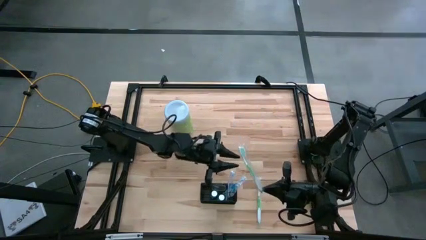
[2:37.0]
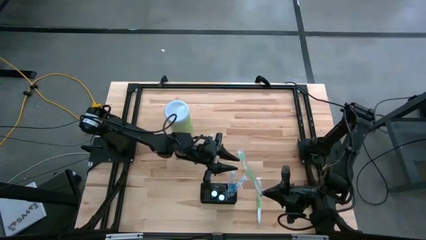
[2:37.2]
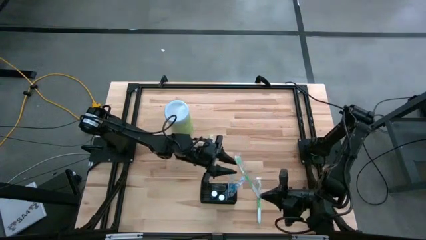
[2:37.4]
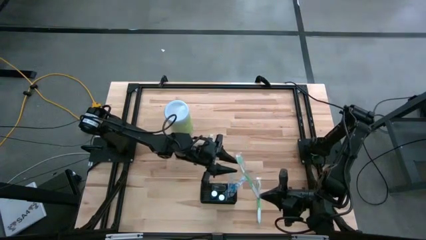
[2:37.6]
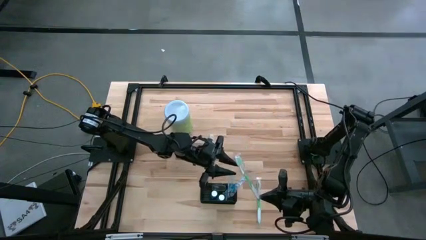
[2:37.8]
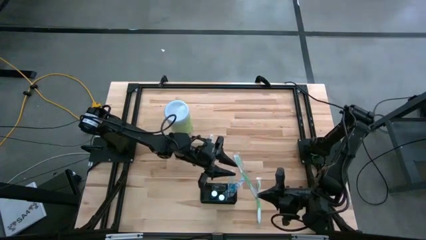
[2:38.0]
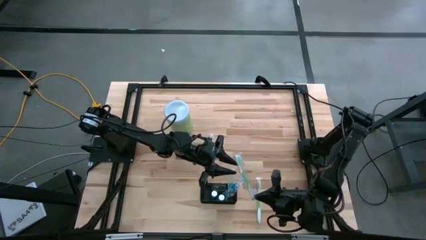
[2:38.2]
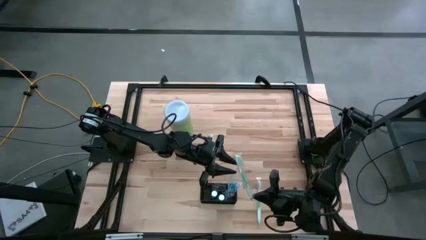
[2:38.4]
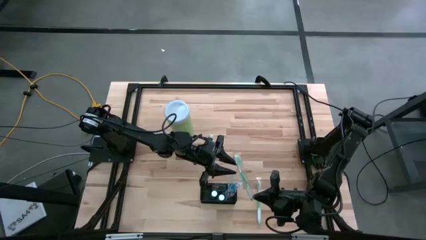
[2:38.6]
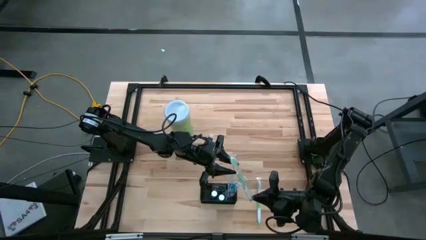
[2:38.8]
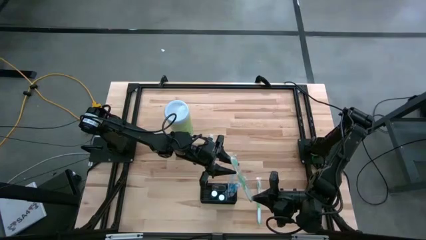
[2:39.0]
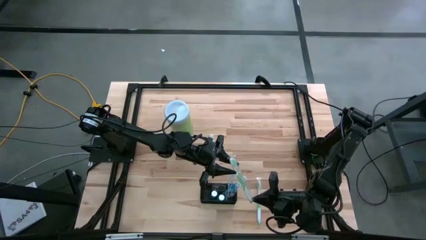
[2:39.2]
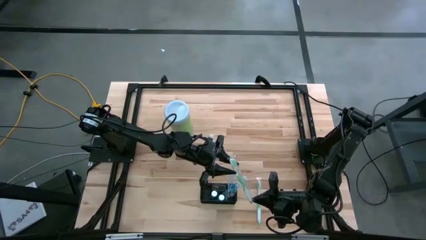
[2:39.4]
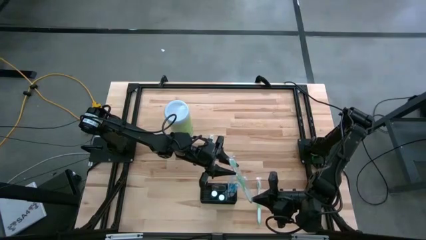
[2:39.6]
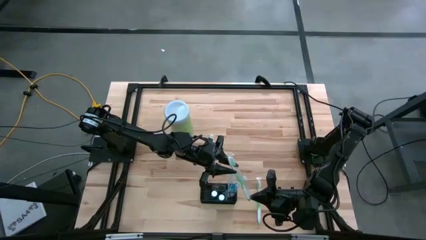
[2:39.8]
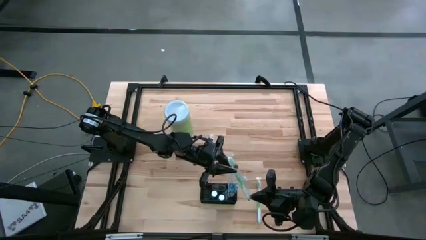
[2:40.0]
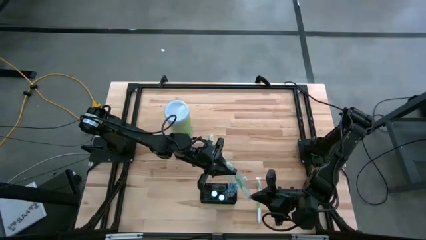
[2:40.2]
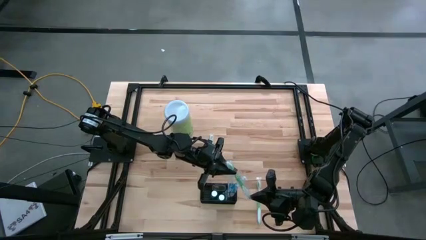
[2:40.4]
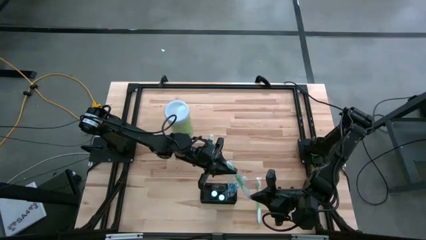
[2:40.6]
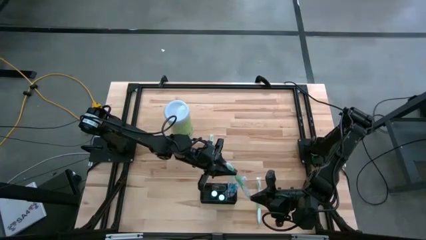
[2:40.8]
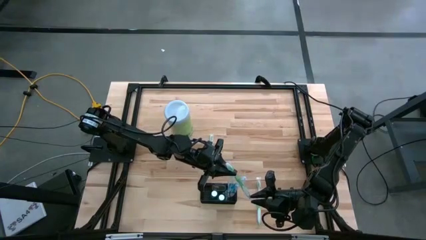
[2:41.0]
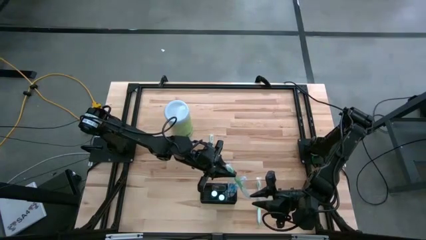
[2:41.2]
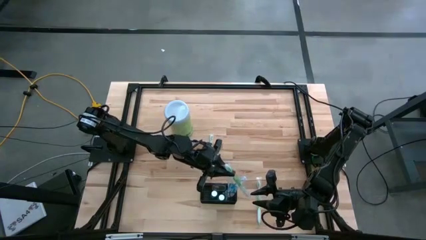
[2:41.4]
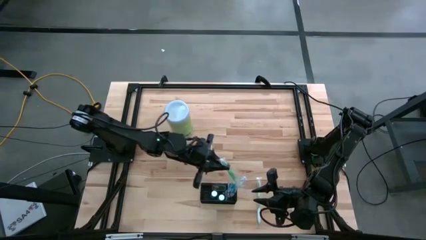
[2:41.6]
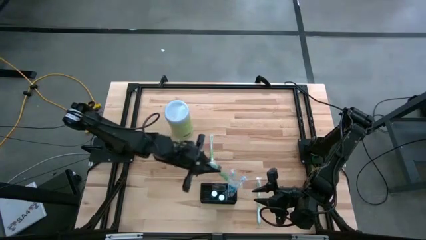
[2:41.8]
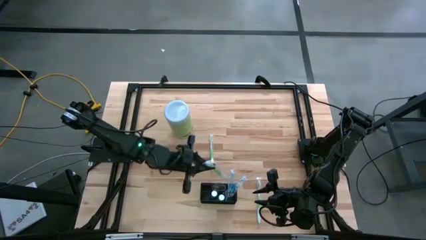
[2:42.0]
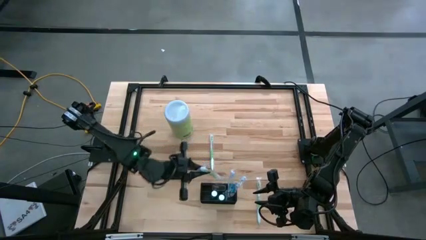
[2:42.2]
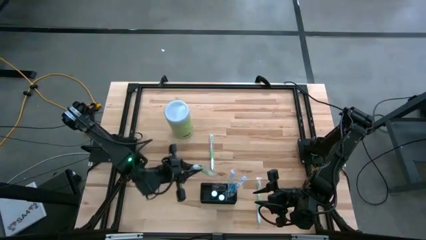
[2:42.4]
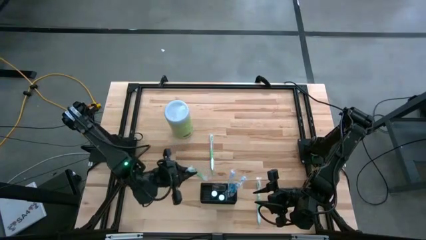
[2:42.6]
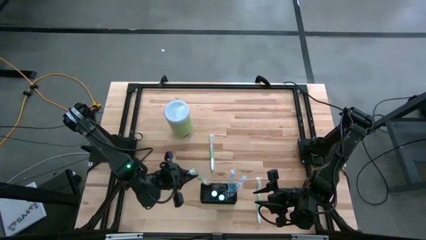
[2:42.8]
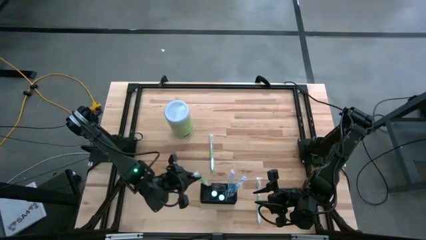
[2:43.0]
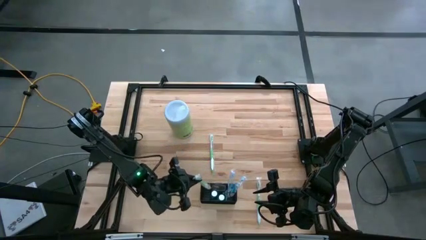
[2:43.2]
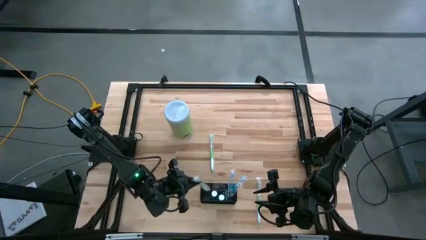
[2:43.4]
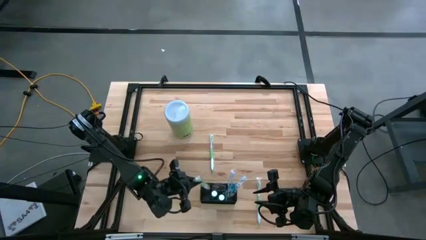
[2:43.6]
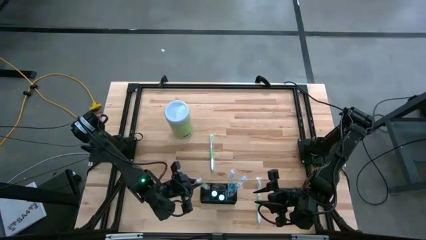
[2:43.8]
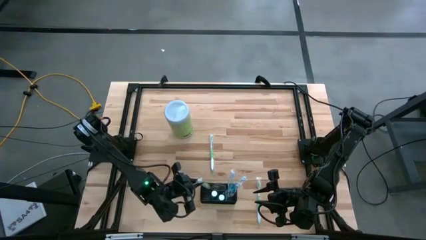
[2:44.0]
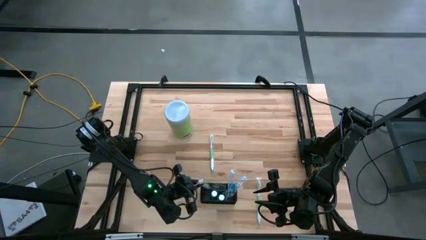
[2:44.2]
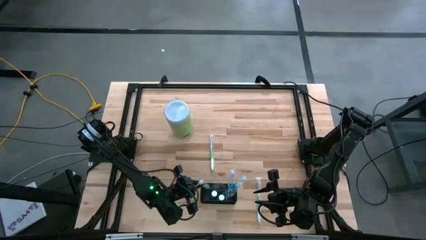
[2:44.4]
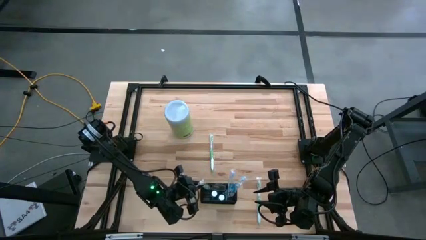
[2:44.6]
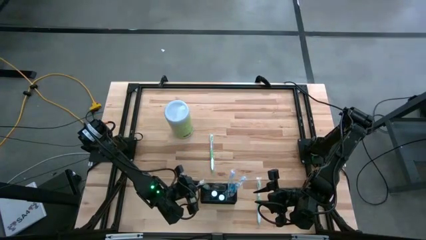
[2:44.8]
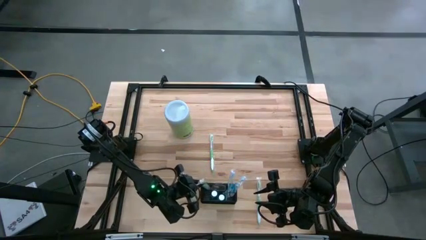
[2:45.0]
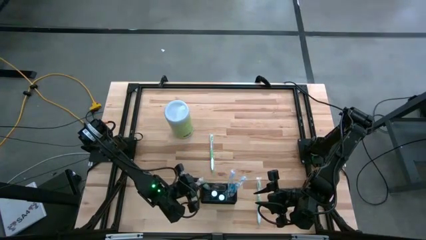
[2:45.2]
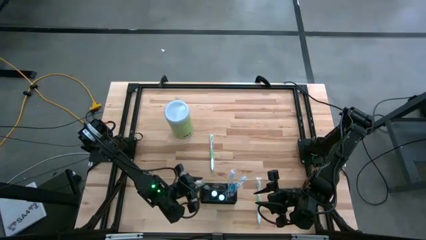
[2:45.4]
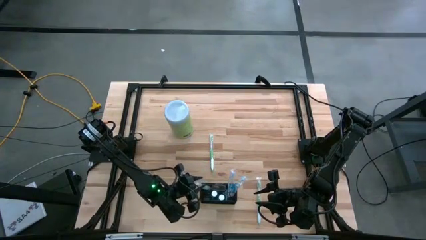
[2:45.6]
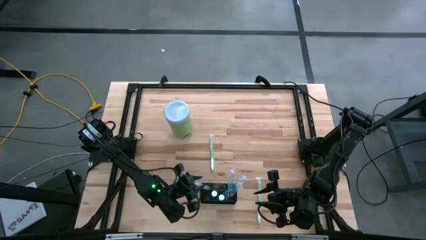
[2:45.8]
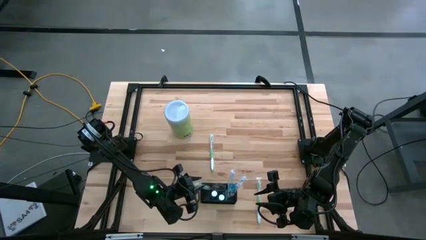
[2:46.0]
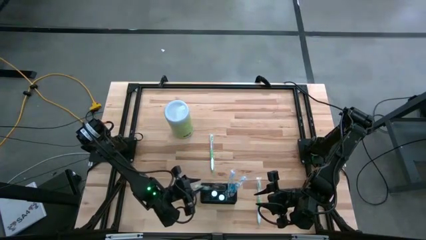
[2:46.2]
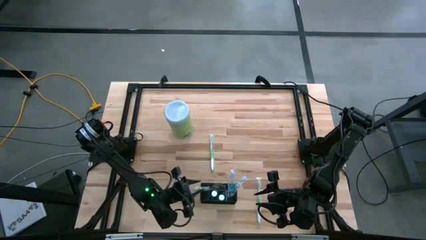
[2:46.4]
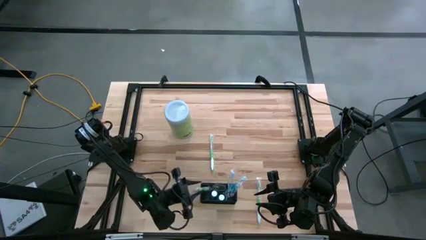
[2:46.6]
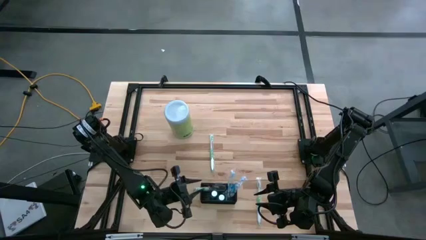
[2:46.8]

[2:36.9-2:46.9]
Task: Pick & Place toothbrushing station
Put the top right green toothbrush into the mesh organizer
